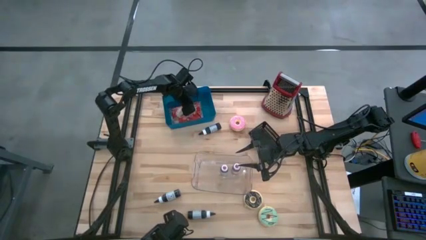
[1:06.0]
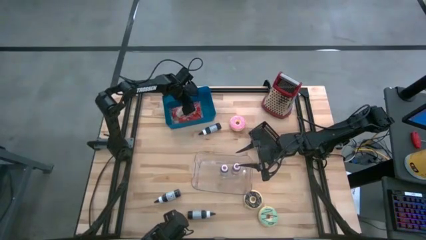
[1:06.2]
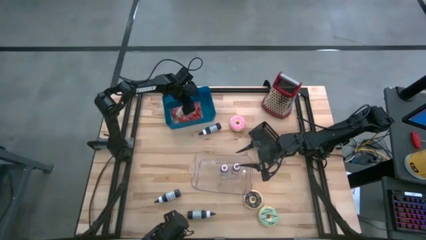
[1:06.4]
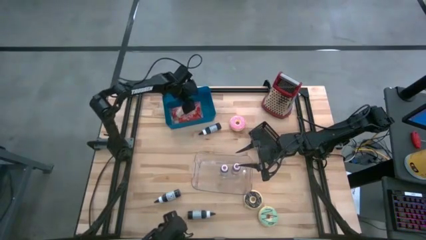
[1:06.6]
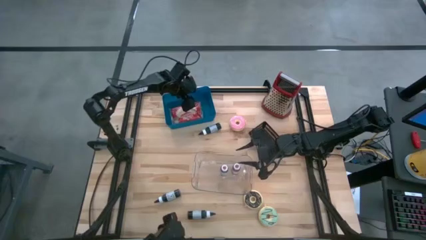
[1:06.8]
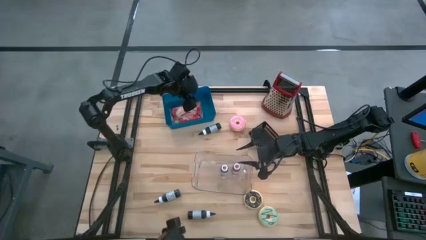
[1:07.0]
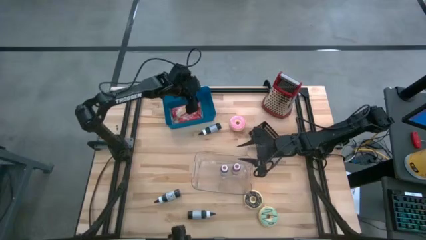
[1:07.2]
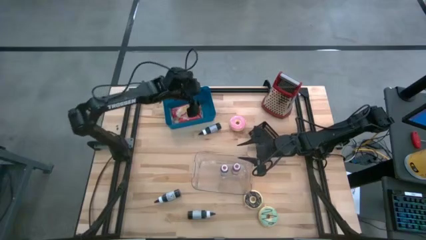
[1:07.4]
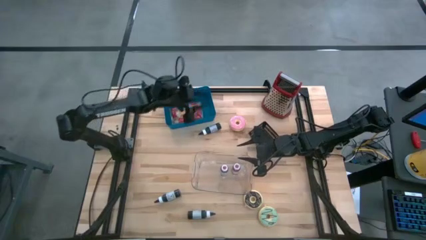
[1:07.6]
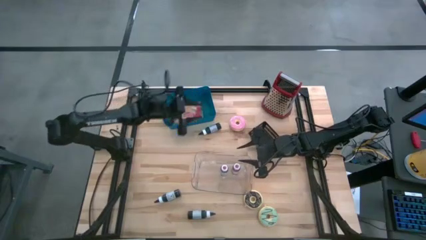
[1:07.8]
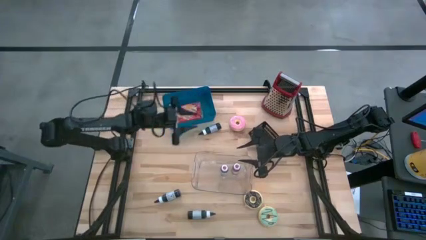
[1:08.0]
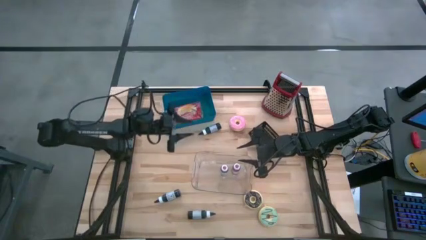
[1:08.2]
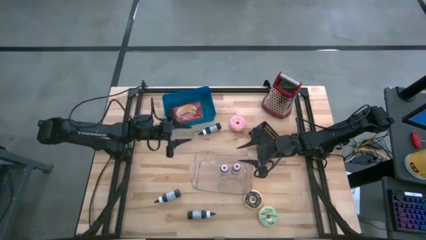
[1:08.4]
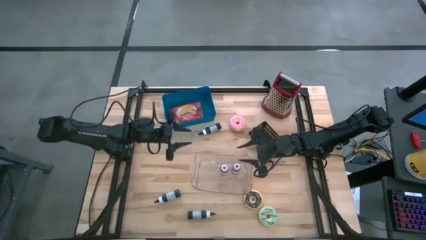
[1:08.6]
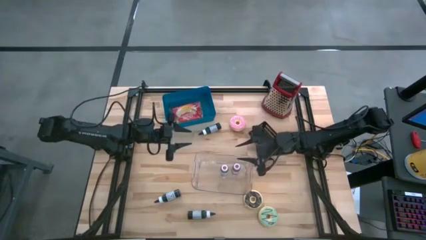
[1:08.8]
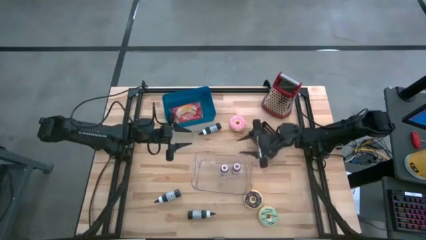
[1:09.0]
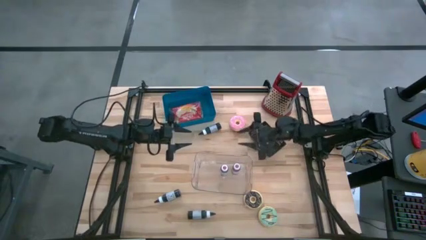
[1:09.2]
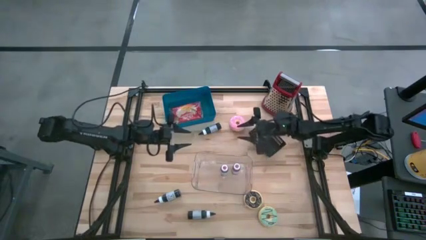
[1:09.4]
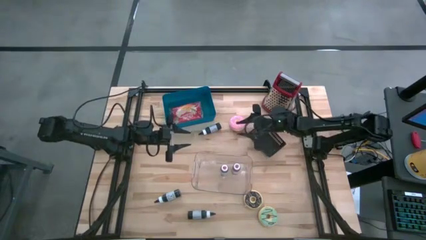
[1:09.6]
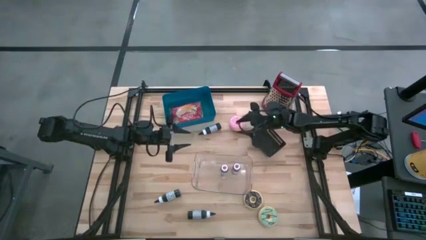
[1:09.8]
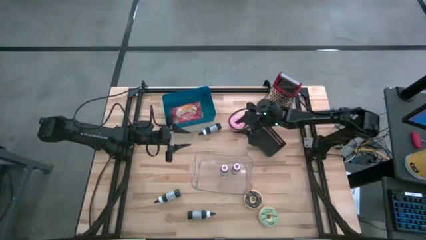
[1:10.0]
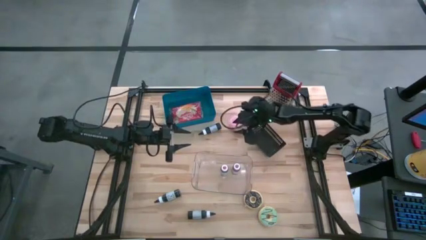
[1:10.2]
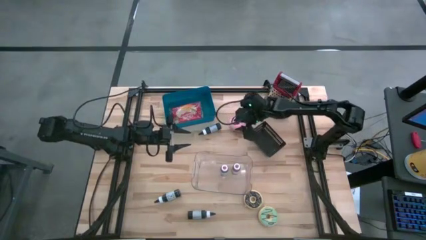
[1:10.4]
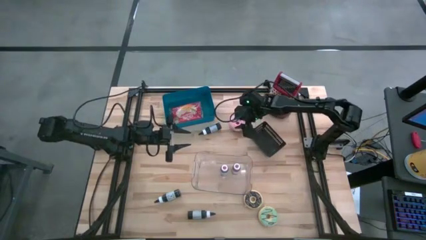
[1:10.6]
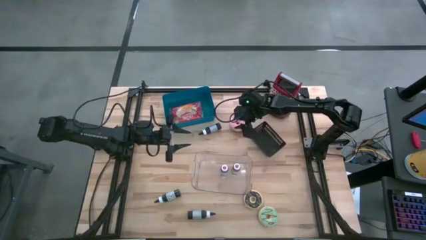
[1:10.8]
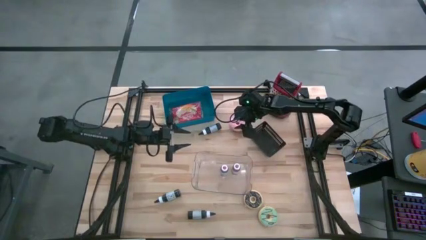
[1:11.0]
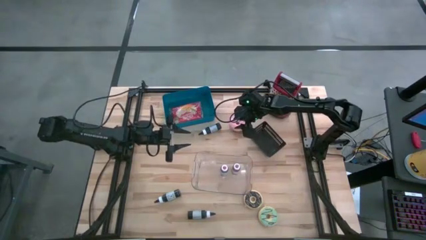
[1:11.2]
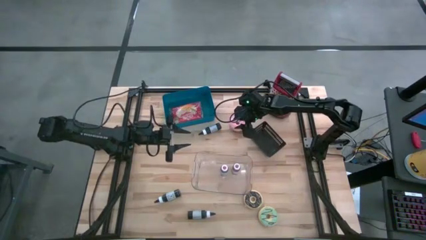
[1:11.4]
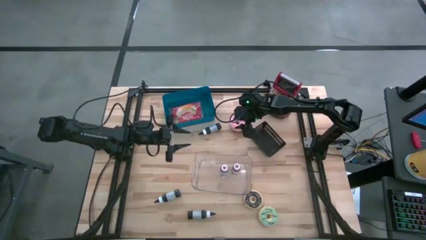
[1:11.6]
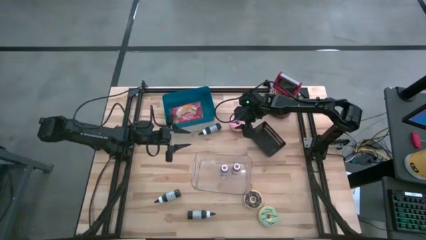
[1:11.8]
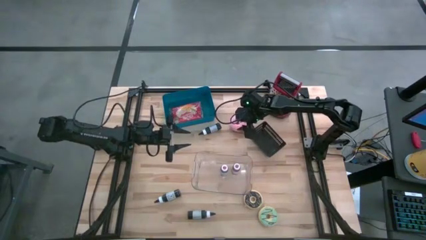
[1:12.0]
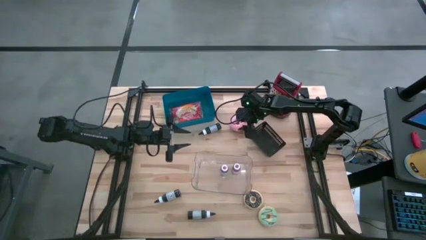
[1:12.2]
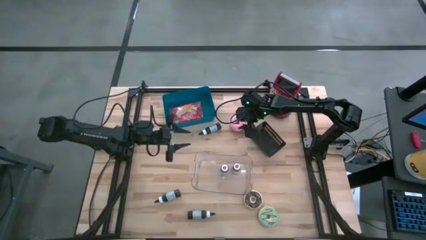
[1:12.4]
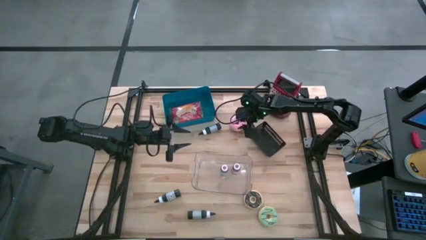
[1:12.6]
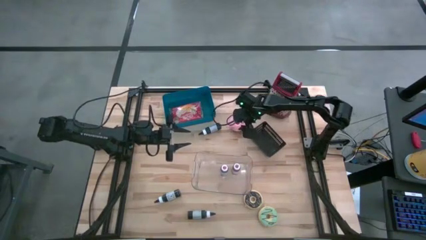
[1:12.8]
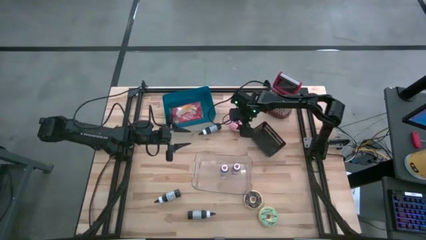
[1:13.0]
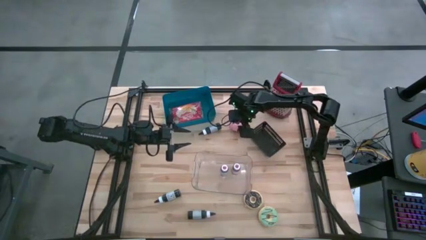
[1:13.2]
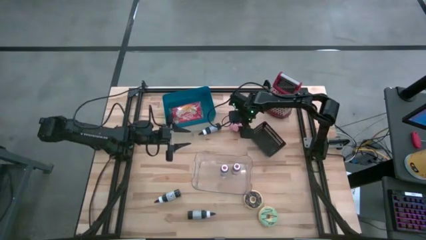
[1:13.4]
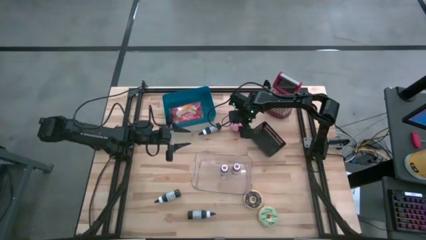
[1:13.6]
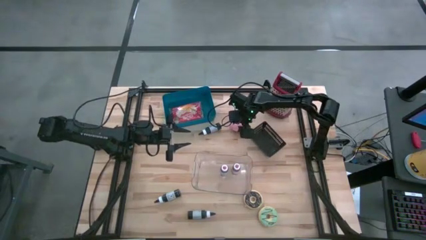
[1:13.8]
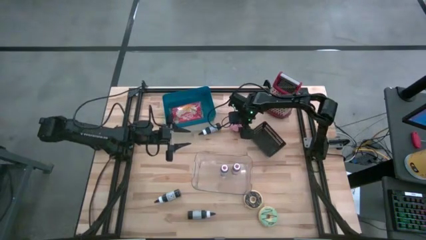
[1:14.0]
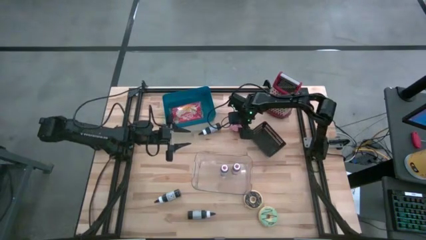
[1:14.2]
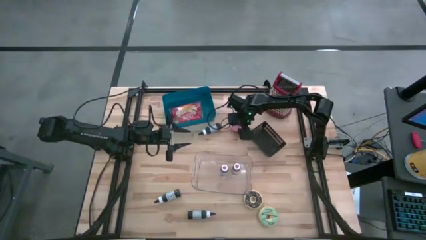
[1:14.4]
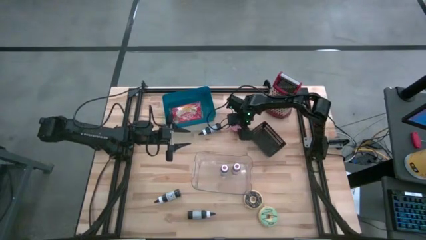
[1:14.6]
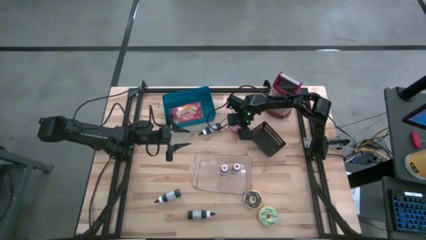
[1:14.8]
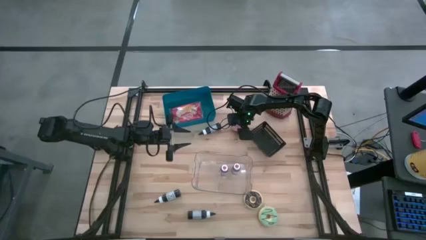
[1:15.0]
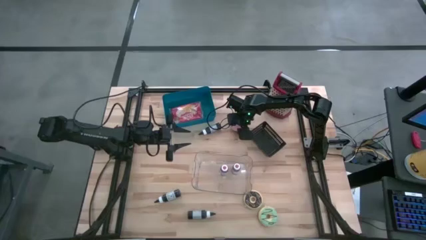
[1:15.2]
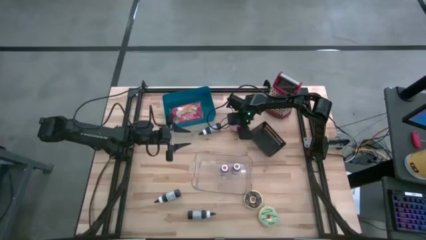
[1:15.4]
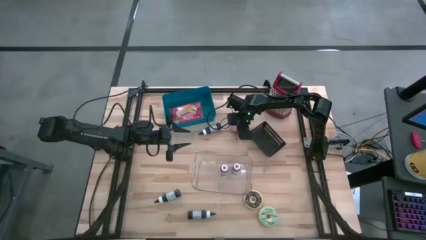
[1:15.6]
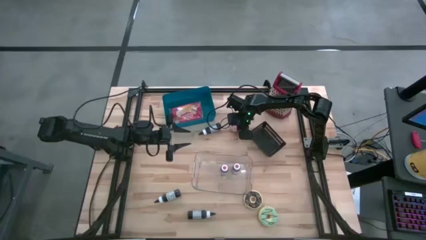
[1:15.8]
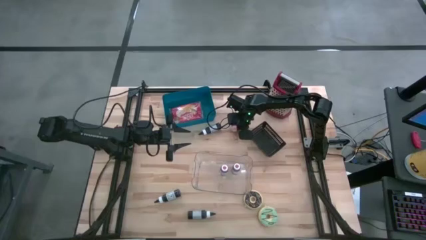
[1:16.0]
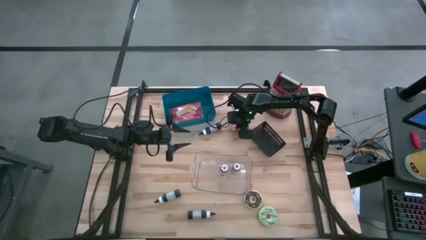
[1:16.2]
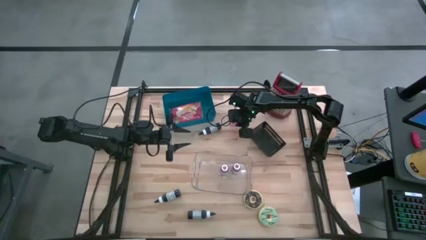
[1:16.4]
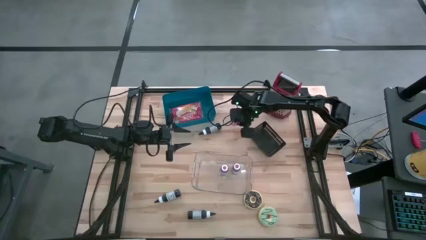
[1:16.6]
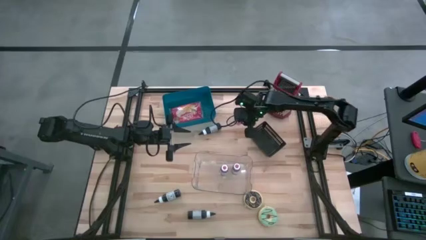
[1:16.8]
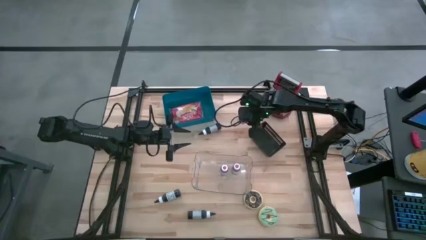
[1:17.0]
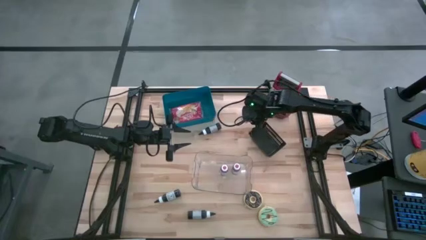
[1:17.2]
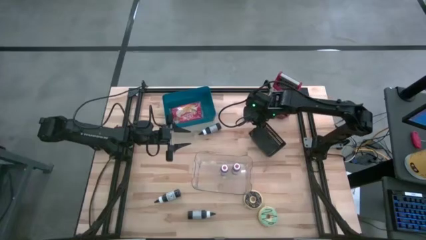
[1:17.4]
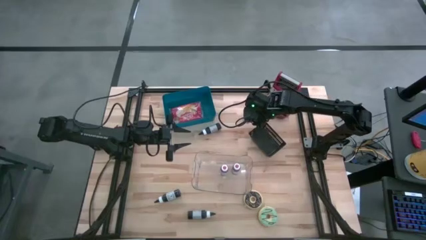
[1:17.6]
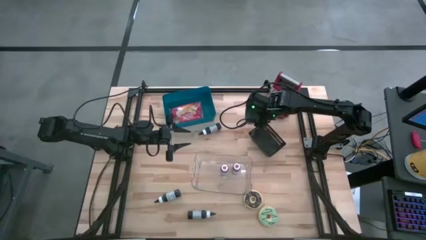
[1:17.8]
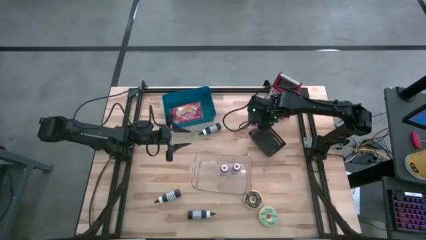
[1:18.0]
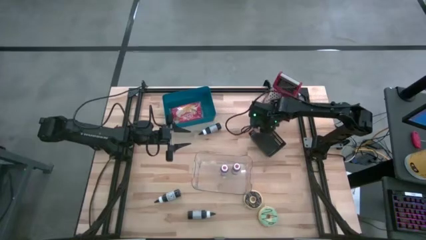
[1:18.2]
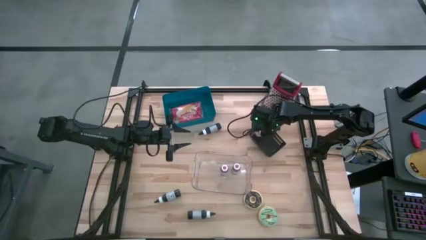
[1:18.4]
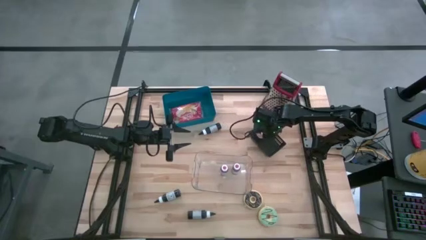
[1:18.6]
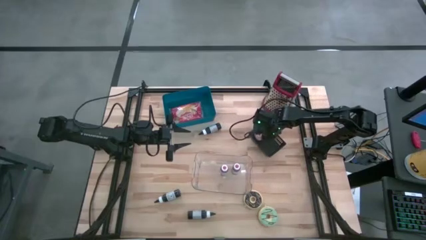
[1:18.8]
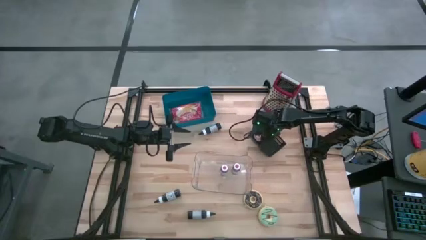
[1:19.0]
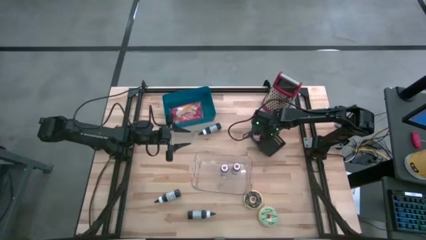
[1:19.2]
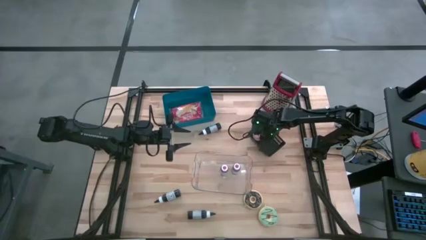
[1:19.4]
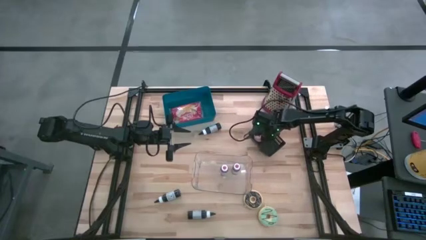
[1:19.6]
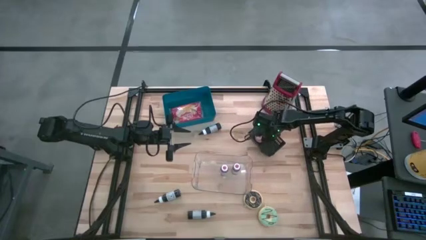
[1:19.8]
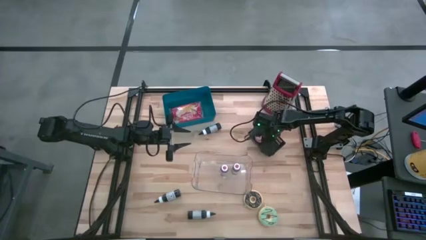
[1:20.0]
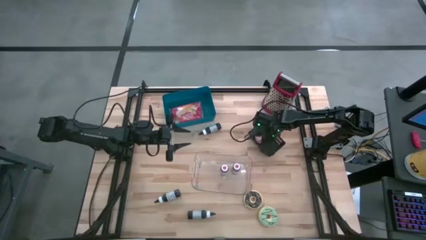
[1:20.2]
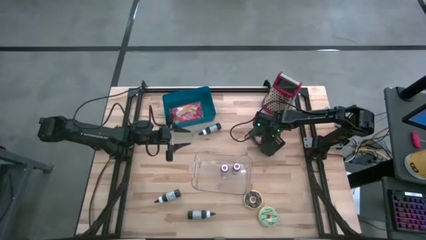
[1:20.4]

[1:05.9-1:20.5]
Put the pink donut into the black bin
